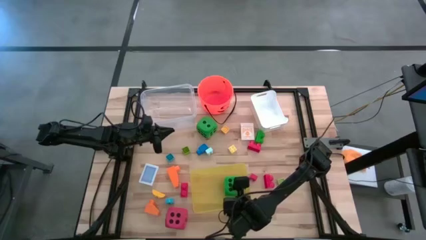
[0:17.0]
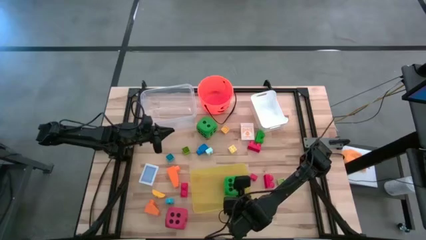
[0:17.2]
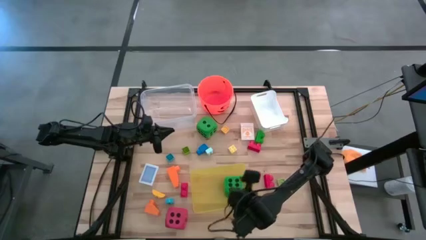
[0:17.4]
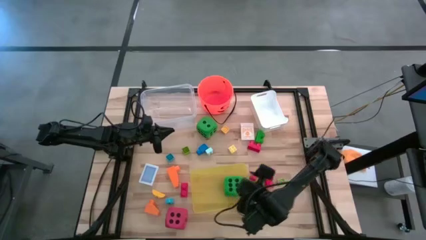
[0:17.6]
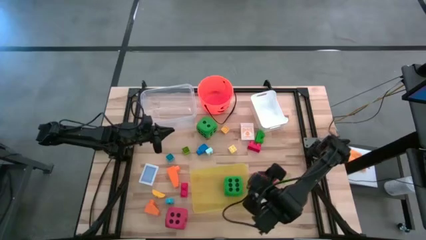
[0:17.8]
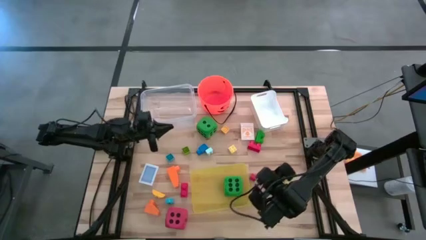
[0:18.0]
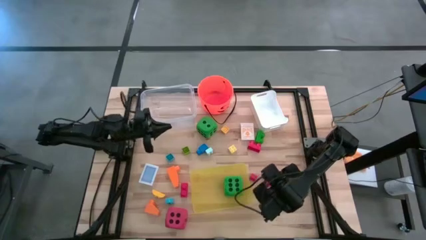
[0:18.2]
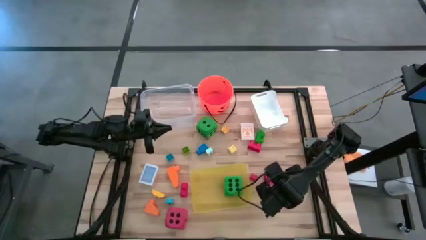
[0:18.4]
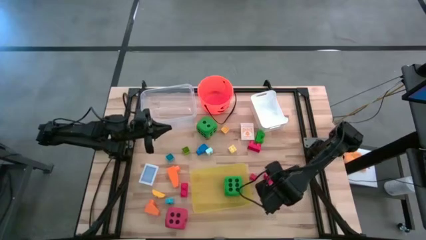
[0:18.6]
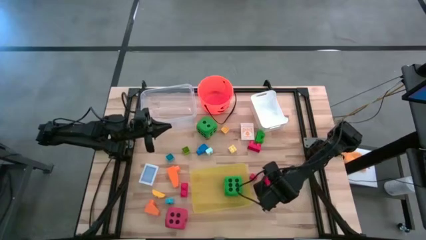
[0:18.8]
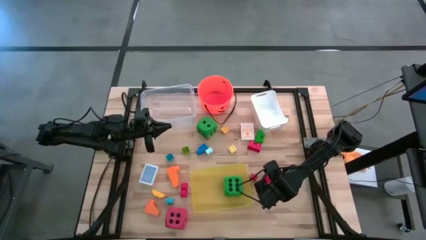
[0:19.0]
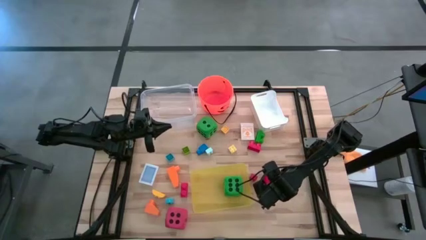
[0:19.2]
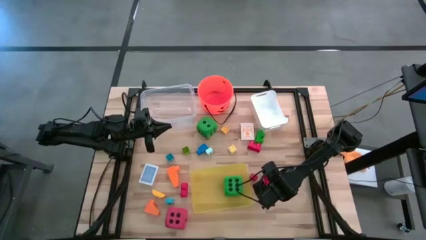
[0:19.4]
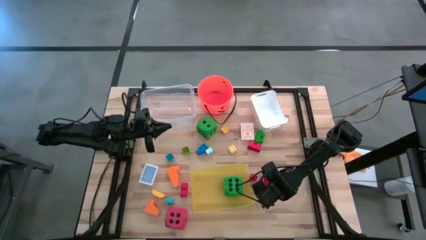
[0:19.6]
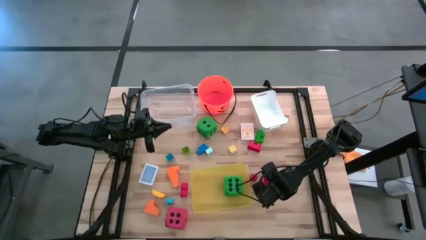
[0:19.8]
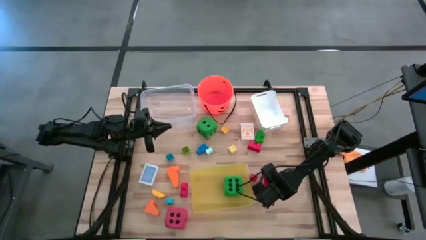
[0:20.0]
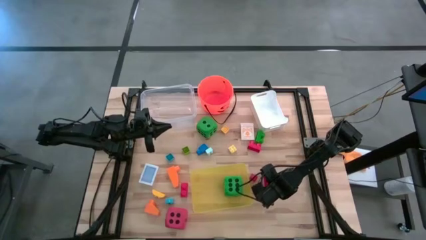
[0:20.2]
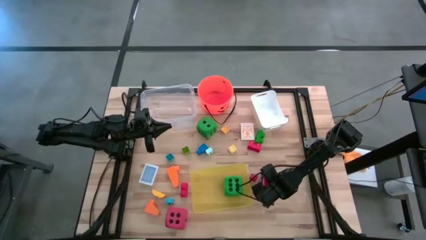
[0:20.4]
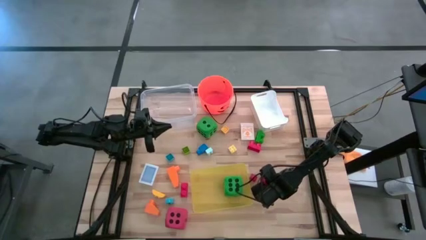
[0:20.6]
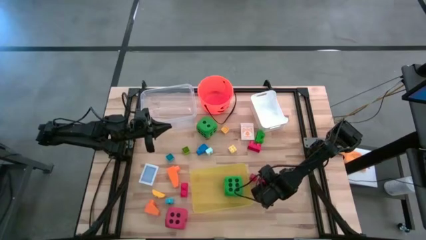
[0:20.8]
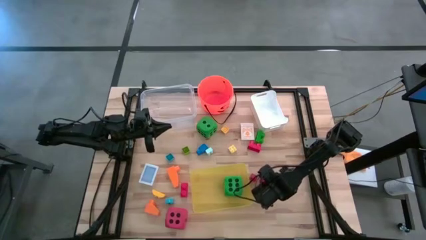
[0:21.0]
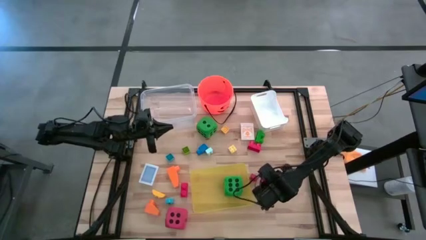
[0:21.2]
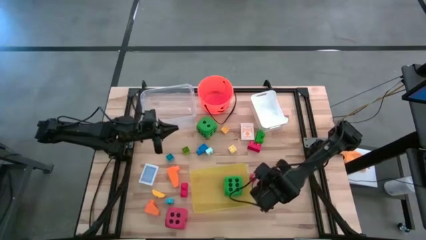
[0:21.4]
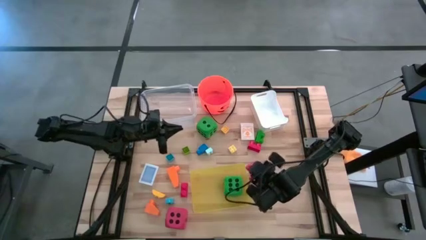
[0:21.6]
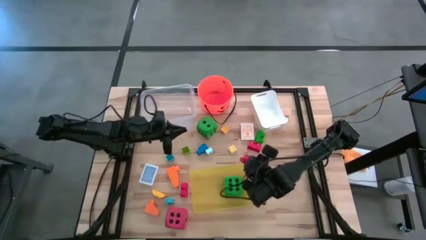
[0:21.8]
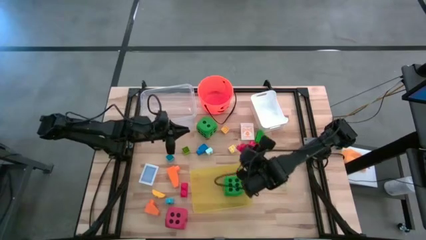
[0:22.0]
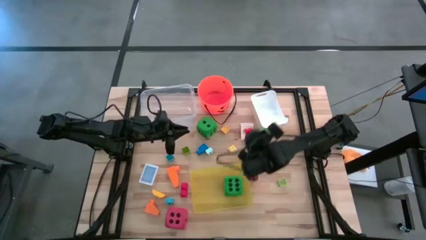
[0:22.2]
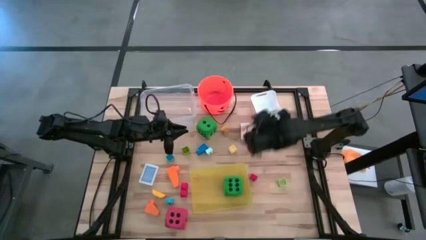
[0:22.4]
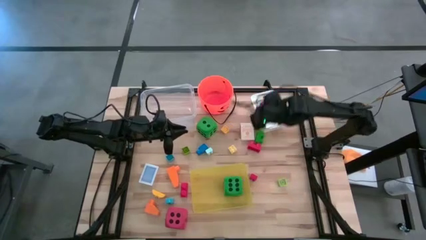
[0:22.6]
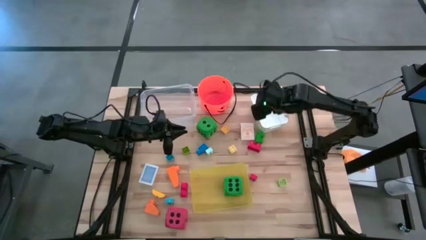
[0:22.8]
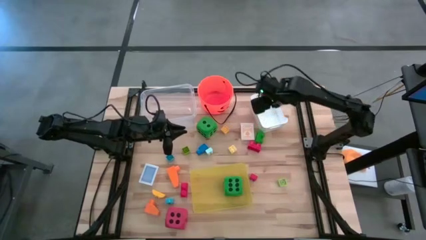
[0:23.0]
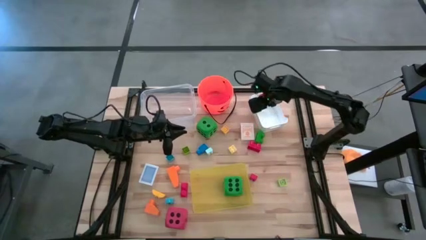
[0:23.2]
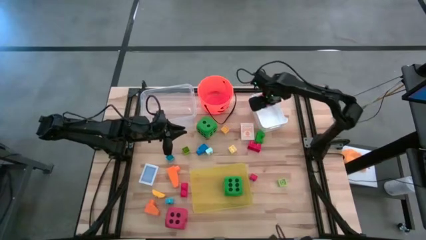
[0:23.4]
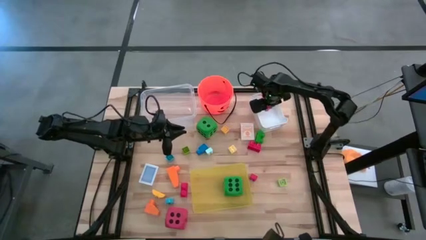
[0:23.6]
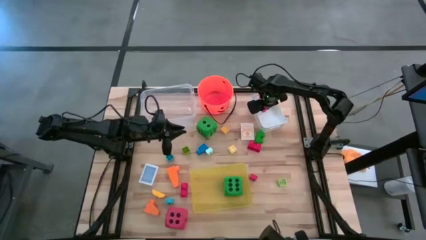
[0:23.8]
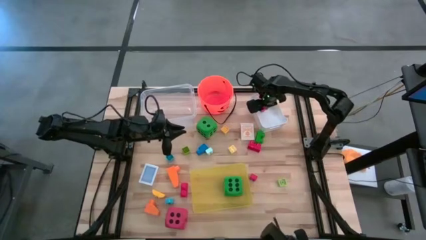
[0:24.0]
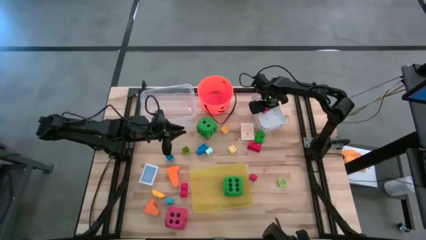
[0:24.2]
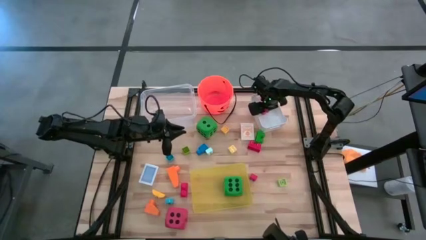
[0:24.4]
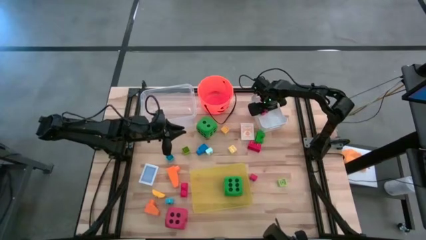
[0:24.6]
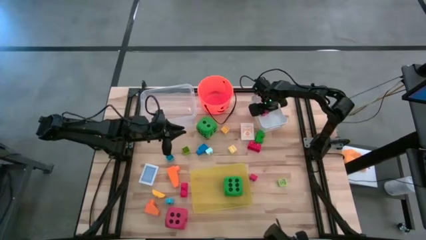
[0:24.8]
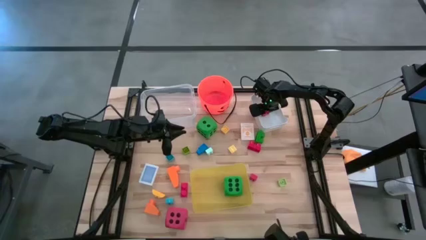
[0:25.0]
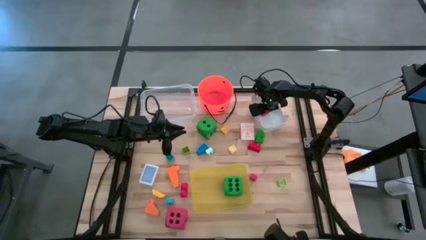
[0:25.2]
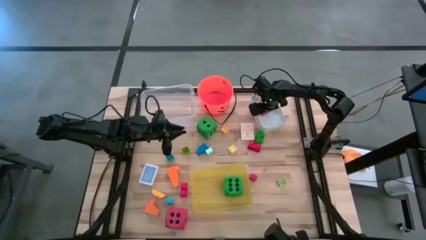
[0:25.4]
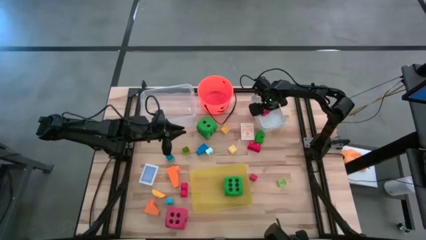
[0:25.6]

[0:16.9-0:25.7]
Task: Pick & Place Toys
Put the red game piece into the white bin

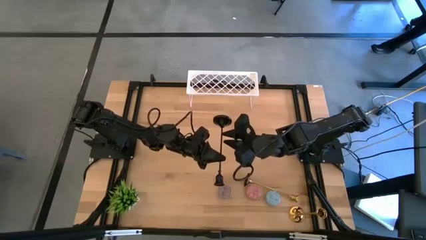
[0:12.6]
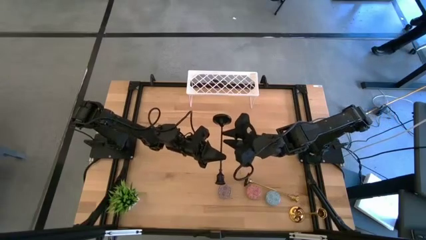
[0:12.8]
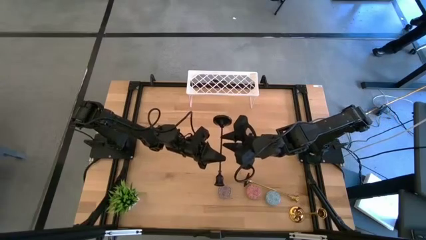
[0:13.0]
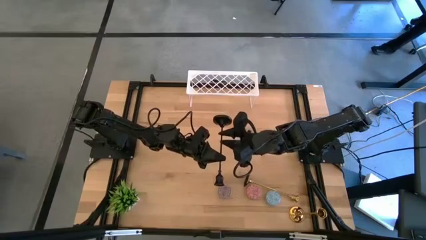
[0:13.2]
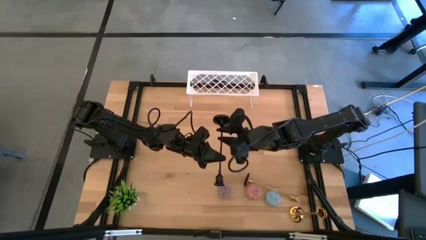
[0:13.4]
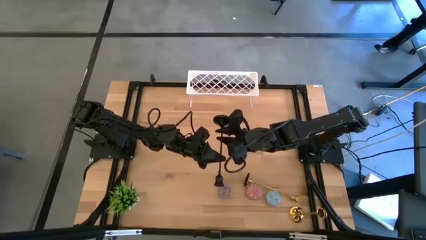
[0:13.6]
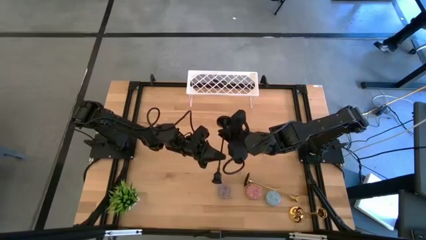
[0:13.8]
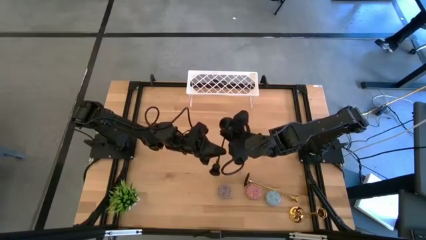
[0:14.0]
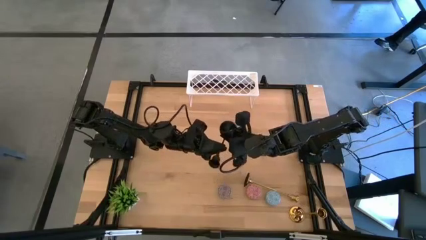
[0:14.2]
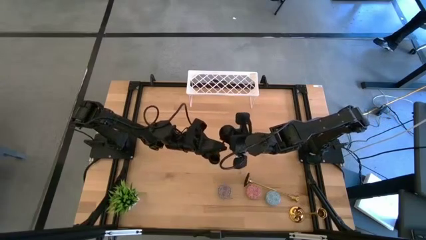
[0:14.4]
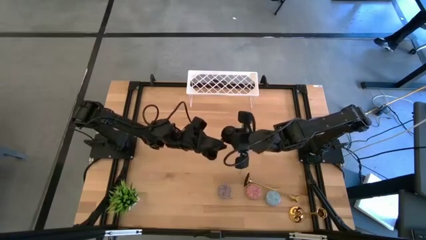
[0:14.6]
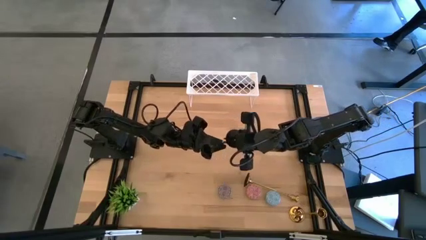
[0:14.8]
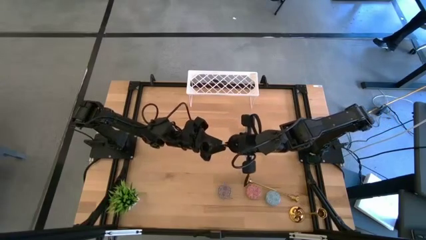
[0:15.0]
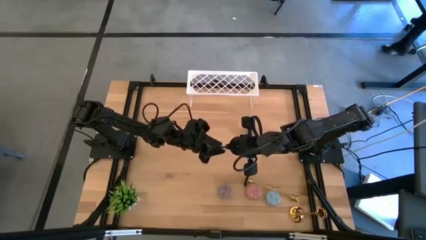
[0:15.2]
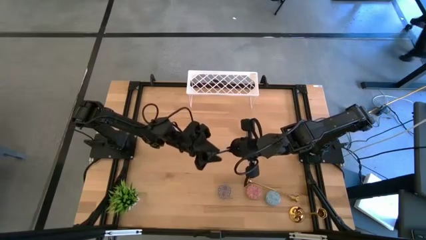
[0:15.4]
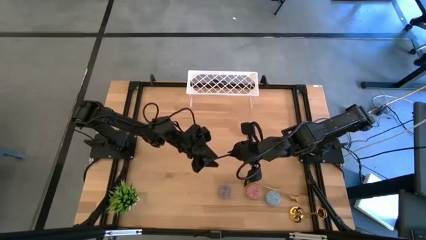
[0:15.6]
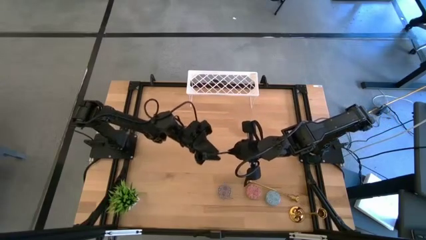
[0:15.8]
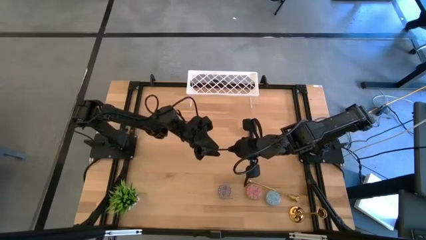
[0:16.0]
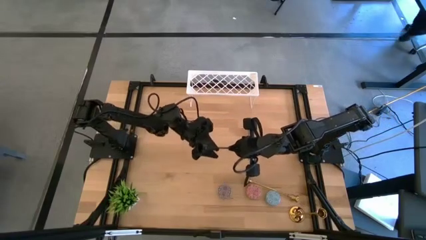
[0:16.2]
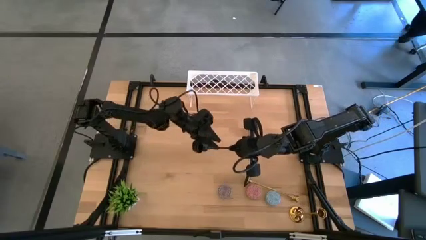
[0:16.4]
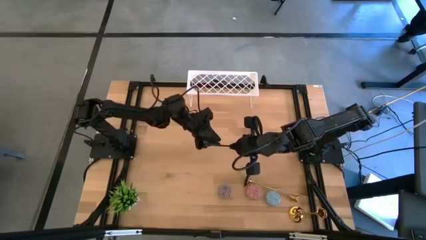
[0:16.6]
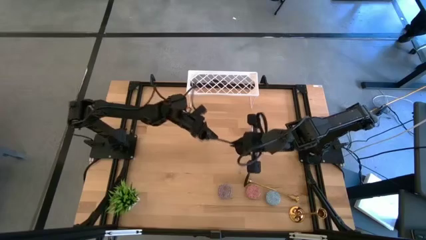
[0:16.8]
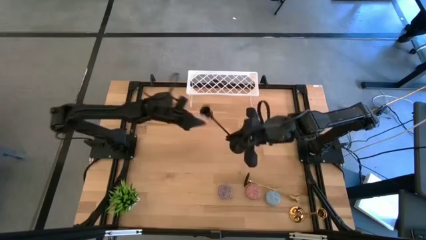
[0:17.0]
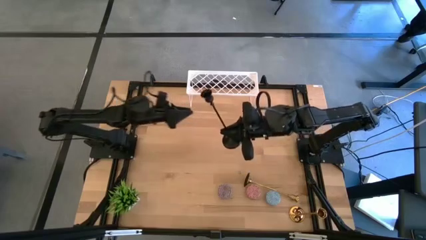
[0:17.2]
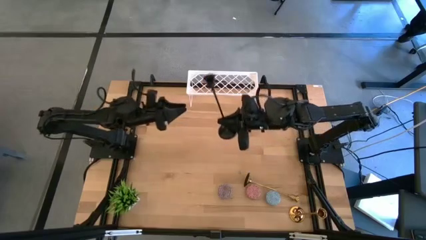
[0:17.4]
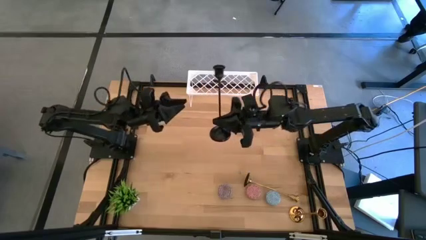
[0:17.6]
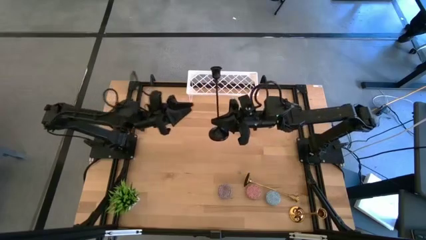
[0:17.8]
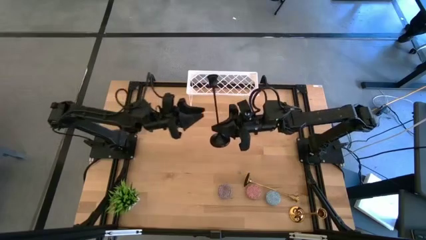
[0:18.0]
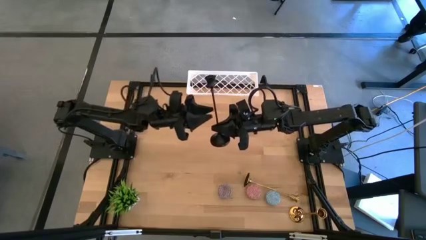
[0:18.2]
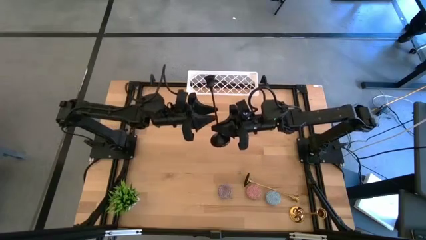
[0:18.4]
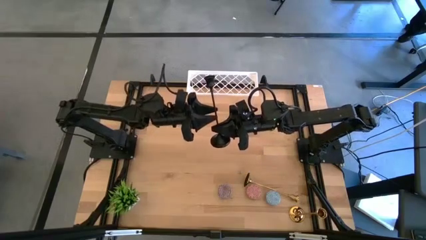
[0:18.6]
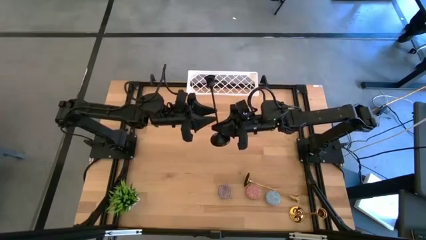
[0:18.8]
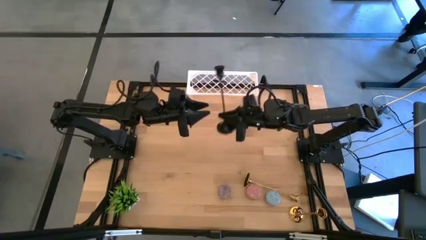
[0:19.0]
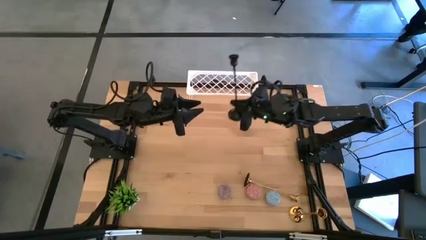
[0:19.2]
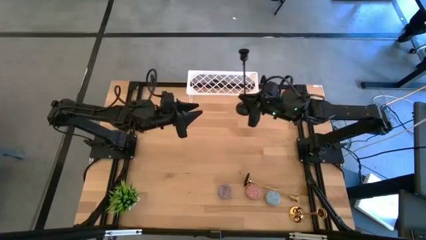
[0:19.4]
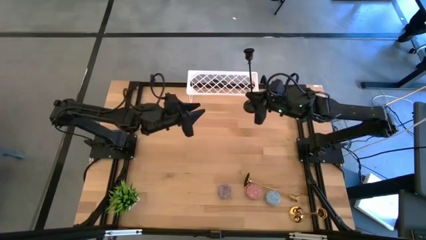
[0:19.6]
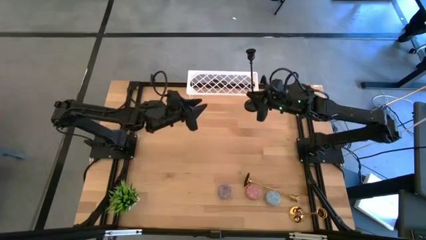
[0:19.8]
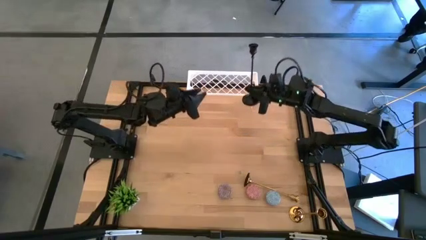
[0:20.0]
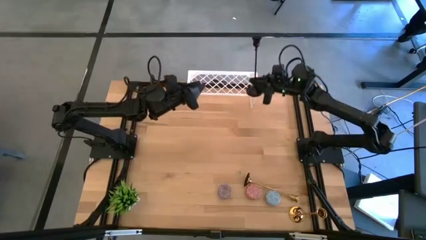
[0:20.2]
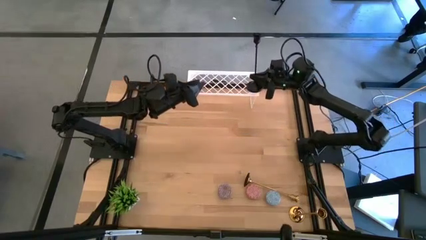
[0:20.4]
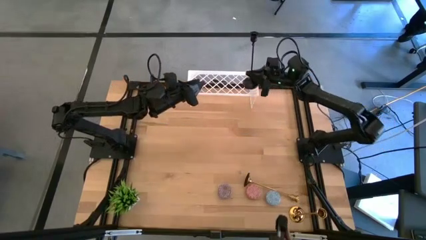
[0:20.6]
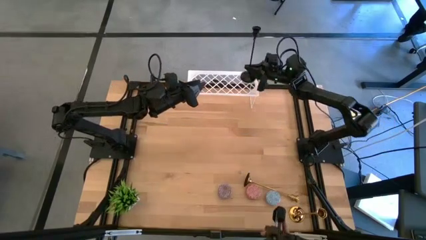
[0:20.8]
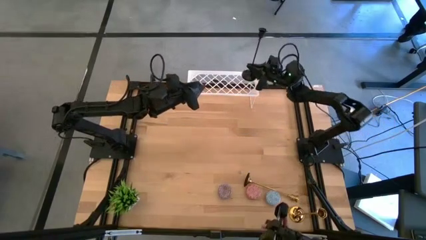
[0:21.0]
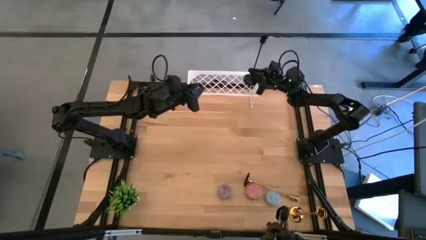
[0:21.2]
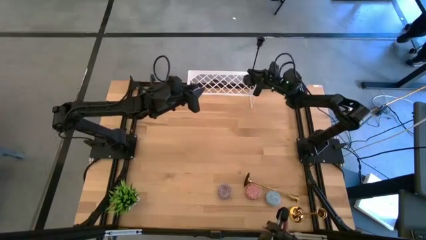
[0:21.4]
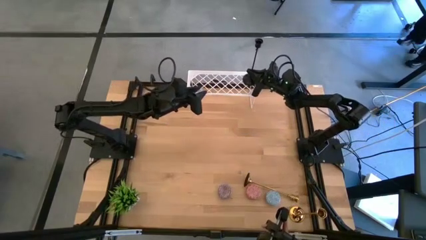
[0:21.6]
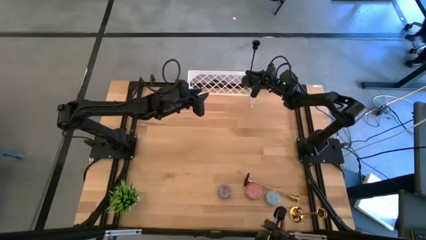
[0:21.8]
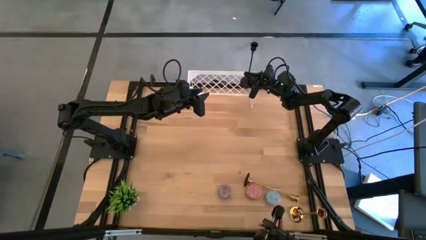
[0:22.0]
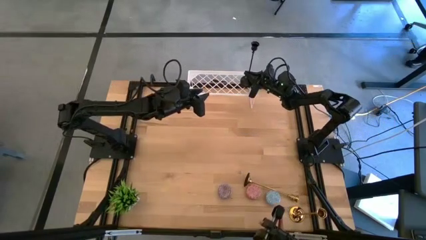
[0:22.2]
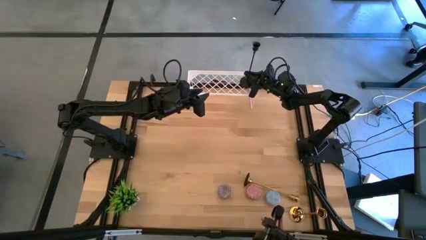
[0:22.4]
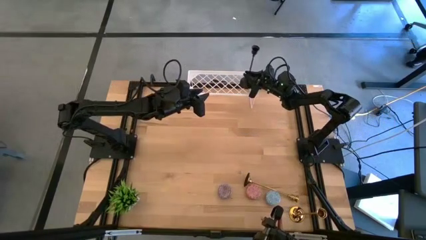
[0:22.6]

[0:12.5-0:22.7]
Task: Pick & Place candle stick holders
Put the black candle holder on the shelf
